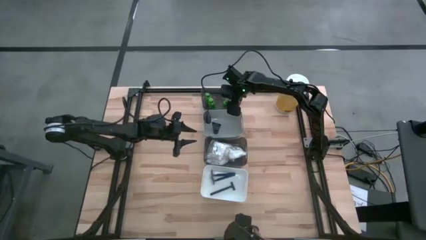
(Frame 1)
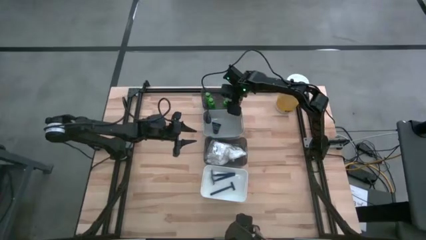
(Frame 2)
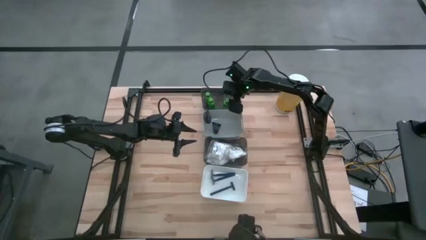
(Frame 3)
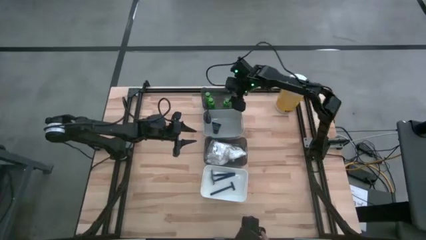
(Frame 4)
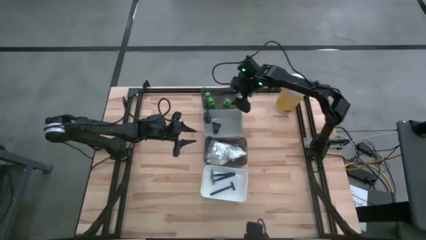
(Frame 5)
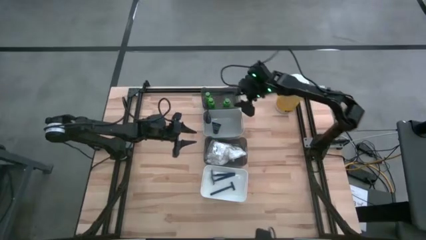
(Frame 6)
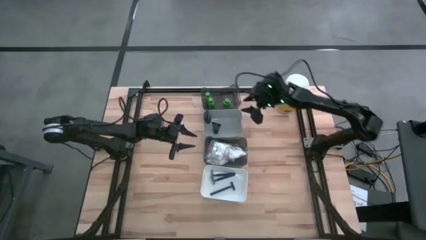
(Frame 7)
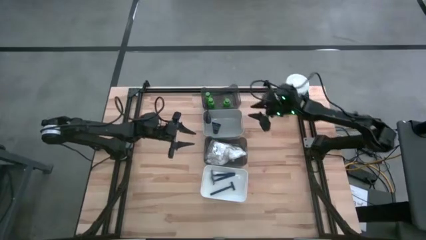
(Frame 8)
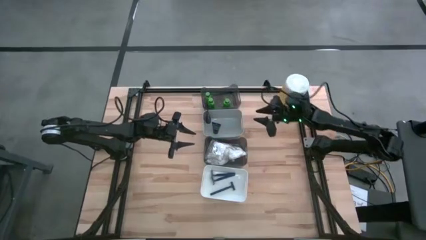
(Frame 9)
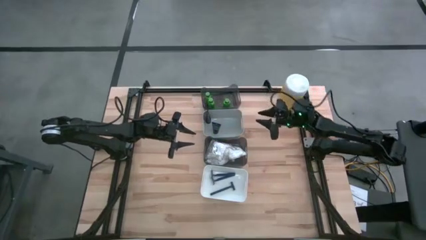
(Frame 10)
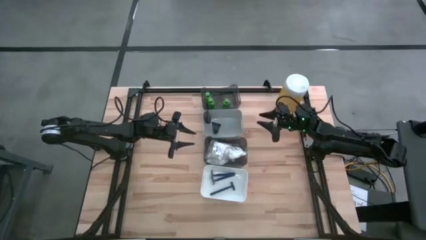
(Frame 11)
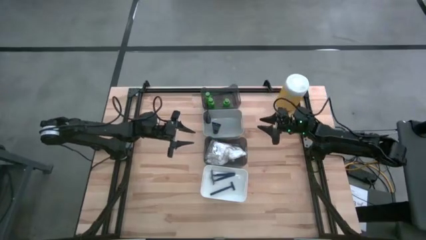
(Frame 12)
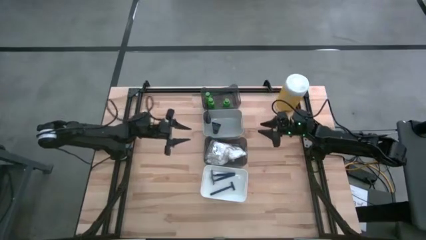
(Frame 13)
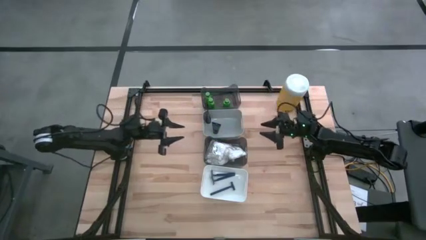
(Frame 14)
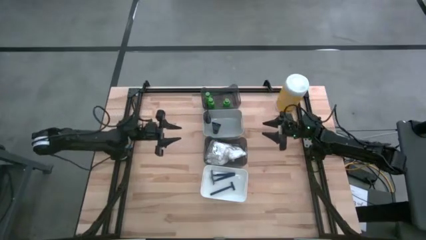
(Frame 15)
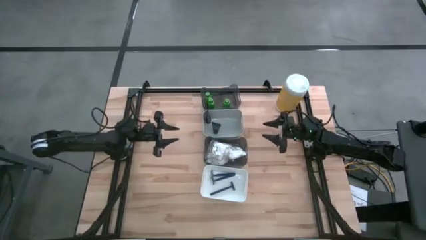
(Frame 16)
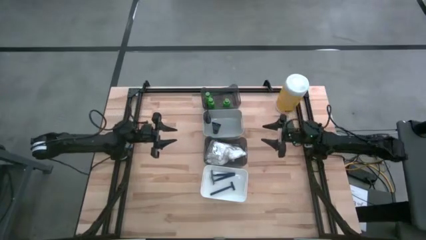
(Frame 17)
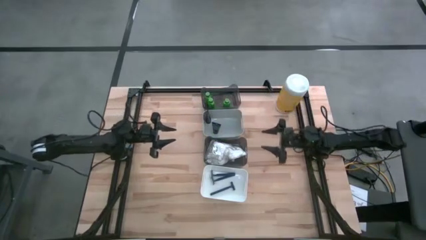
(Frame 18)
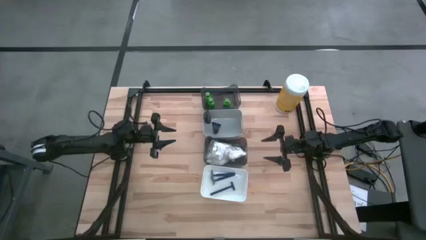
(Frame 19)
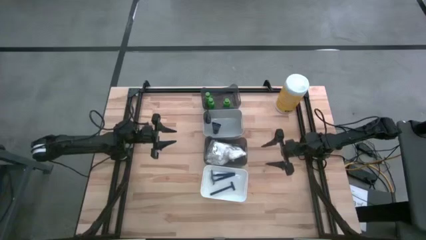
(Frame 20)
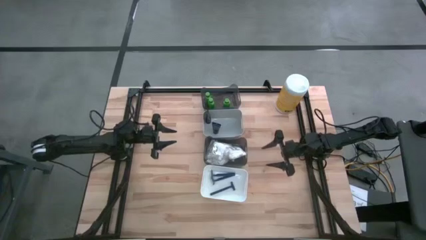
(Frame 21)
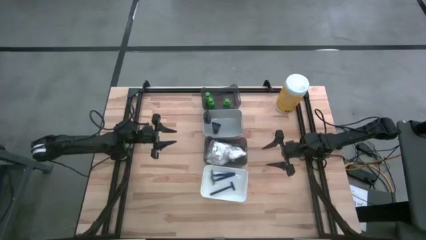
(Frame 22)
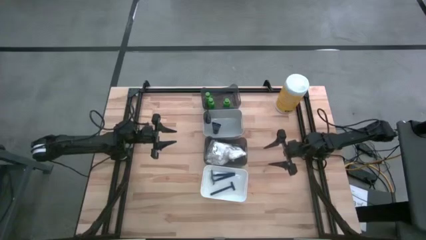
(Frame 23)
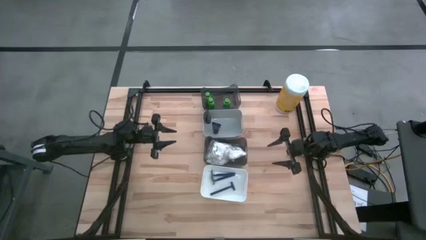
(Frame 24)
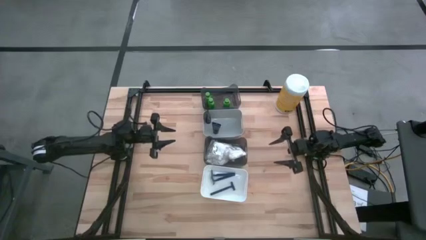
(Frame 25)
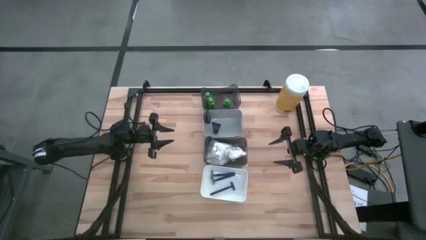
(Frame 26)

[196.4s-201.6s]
Task: Pick & Place Travel size toiletries
Return to Home Position

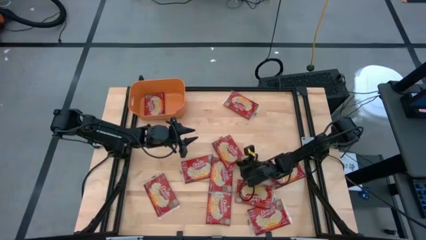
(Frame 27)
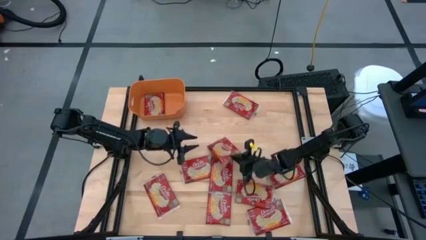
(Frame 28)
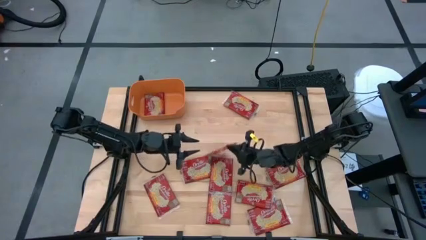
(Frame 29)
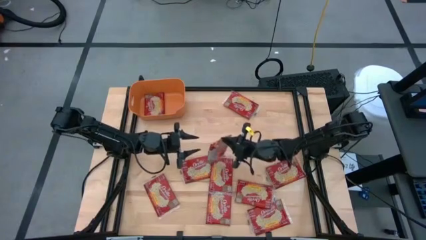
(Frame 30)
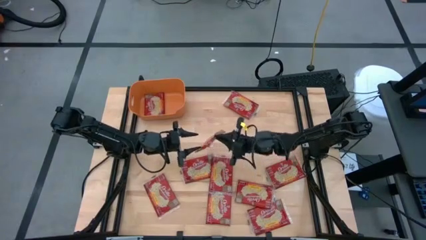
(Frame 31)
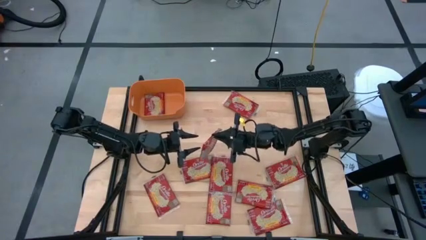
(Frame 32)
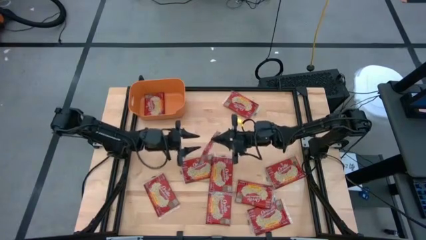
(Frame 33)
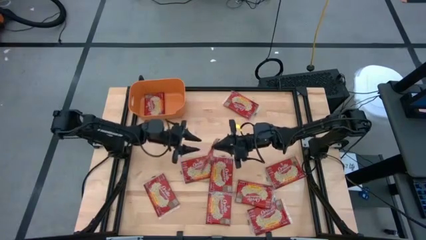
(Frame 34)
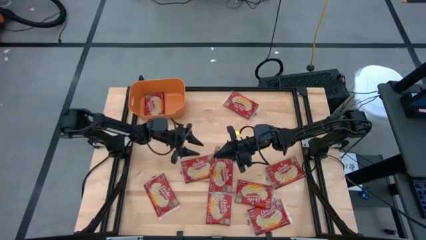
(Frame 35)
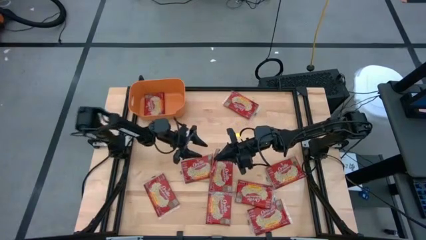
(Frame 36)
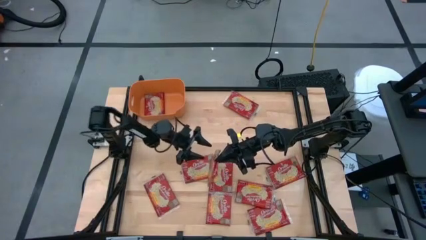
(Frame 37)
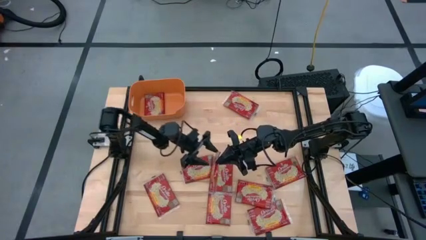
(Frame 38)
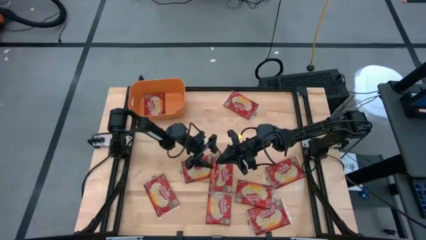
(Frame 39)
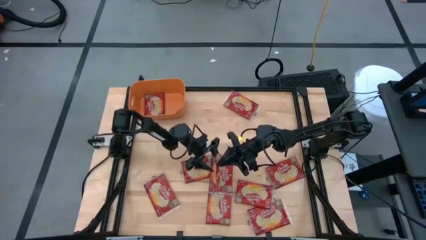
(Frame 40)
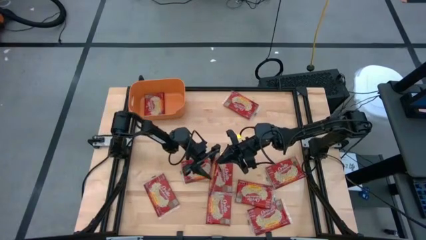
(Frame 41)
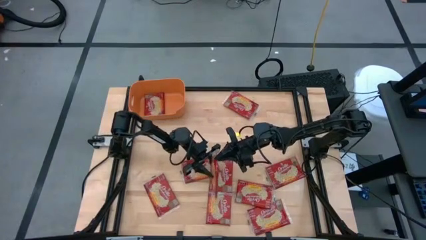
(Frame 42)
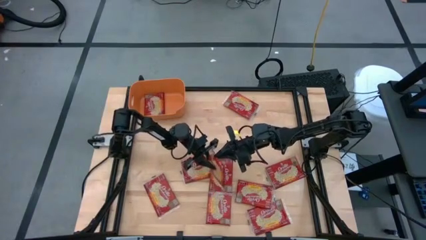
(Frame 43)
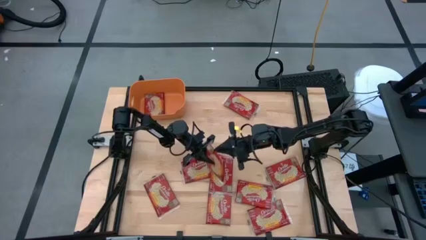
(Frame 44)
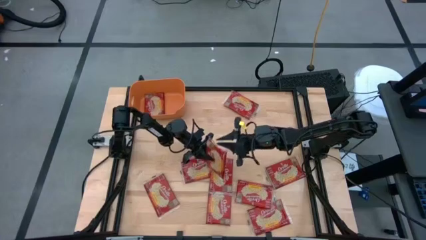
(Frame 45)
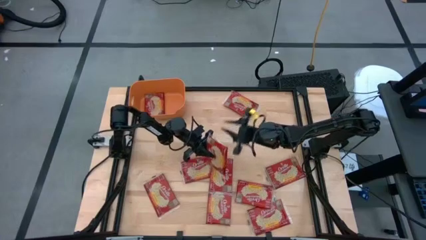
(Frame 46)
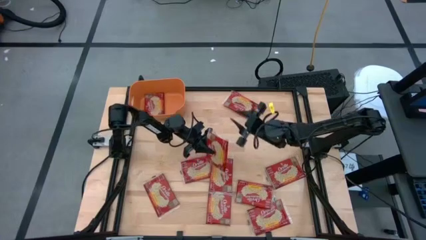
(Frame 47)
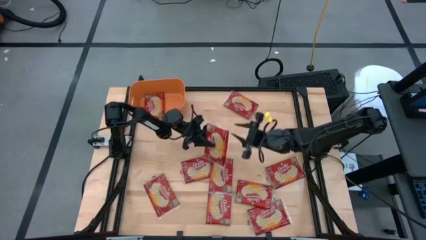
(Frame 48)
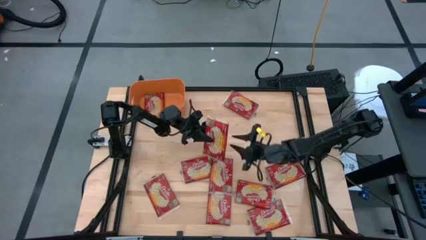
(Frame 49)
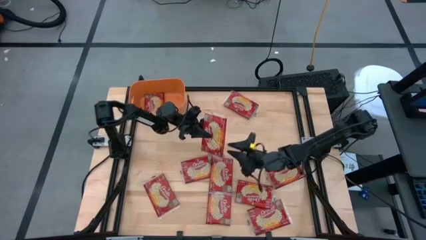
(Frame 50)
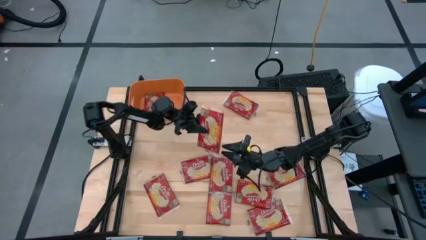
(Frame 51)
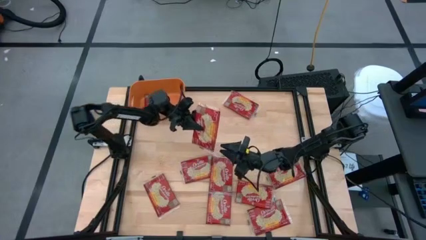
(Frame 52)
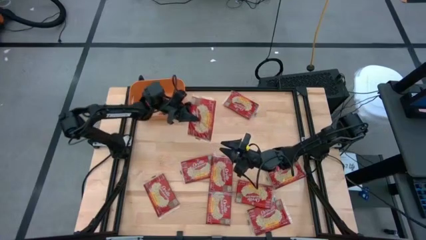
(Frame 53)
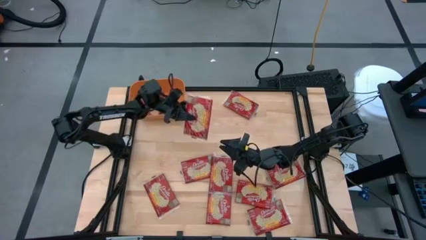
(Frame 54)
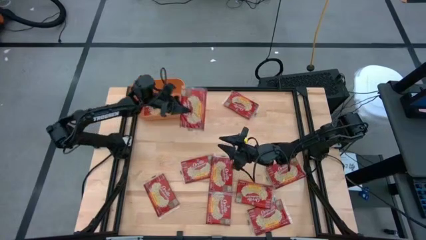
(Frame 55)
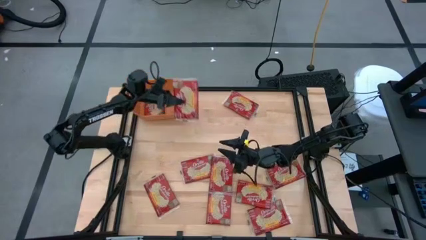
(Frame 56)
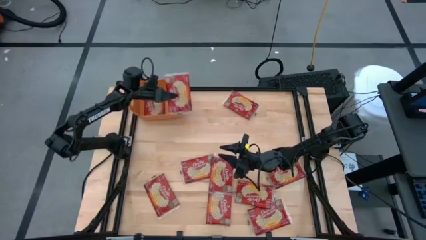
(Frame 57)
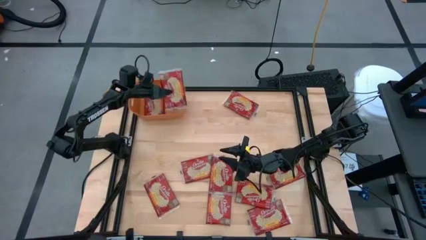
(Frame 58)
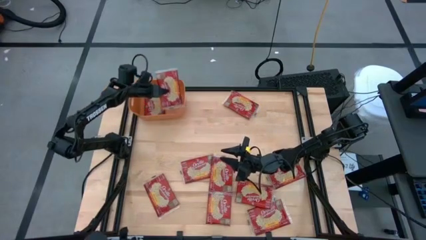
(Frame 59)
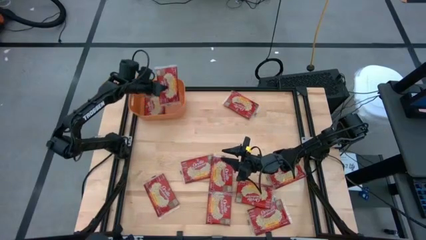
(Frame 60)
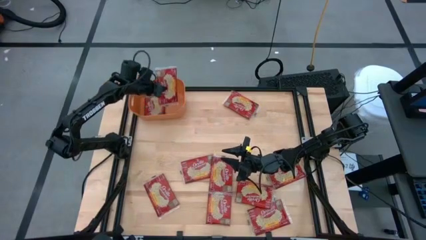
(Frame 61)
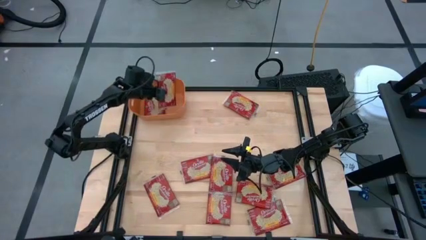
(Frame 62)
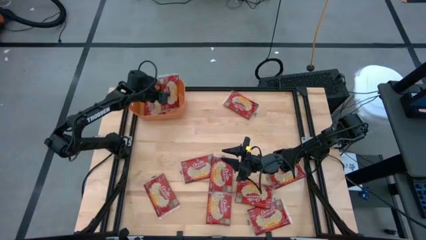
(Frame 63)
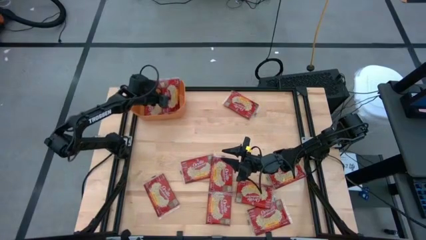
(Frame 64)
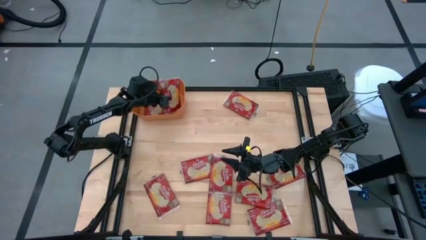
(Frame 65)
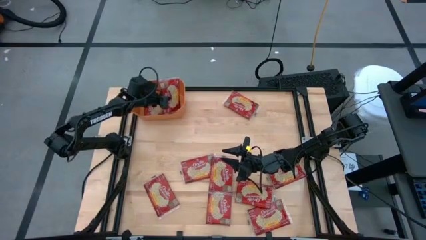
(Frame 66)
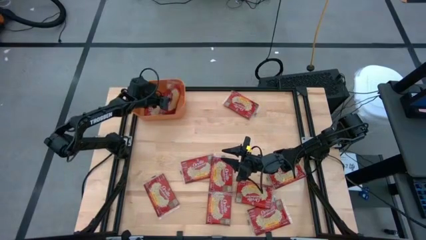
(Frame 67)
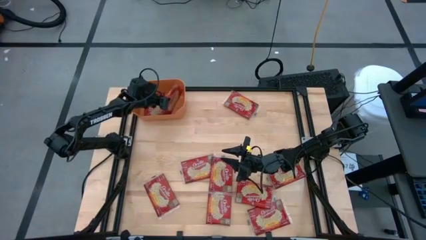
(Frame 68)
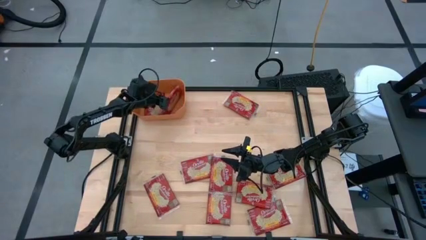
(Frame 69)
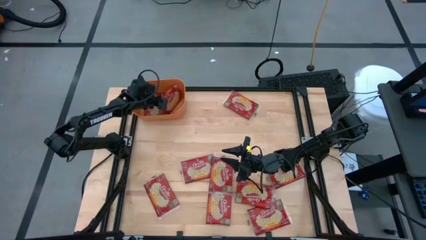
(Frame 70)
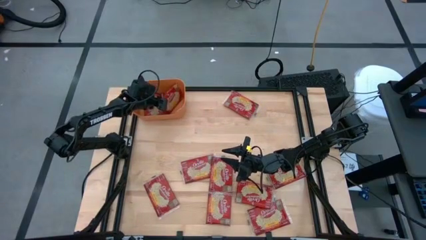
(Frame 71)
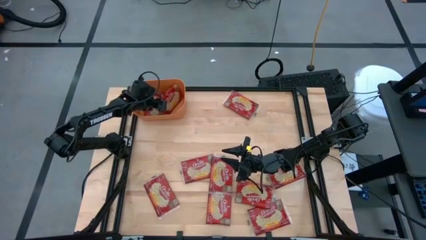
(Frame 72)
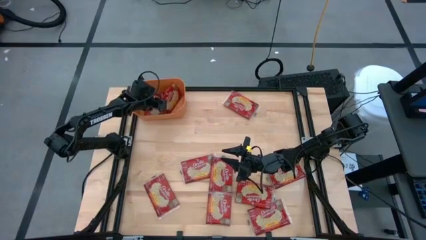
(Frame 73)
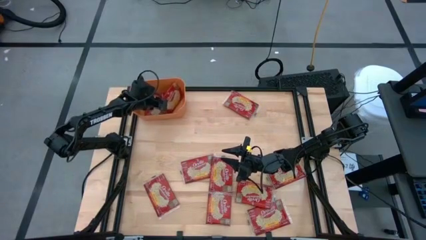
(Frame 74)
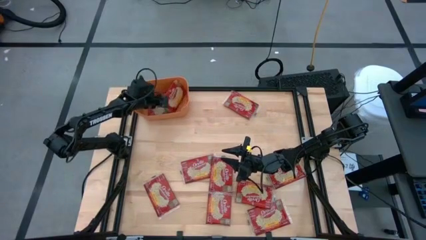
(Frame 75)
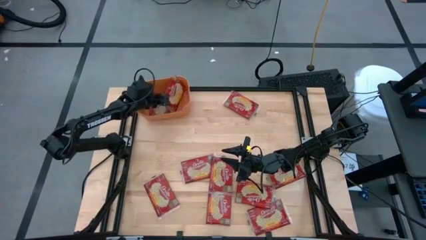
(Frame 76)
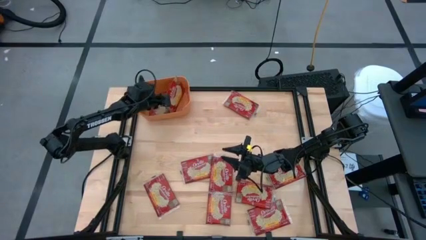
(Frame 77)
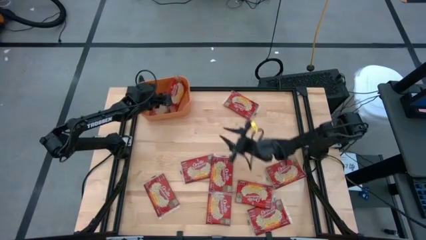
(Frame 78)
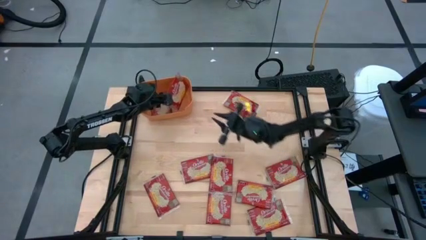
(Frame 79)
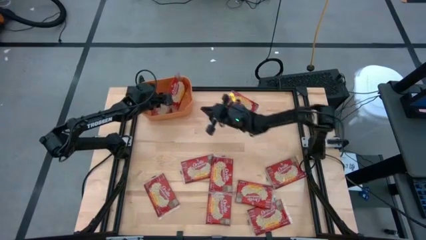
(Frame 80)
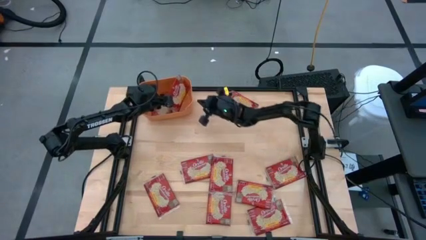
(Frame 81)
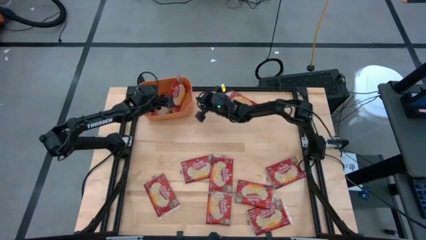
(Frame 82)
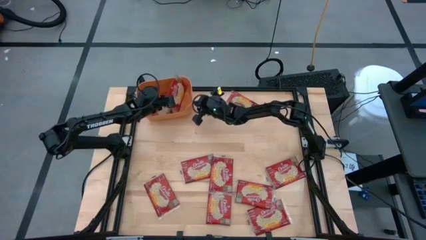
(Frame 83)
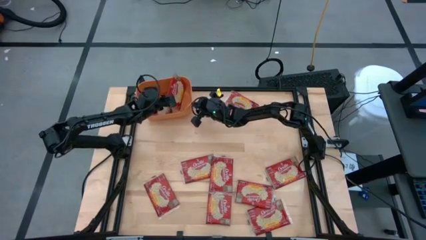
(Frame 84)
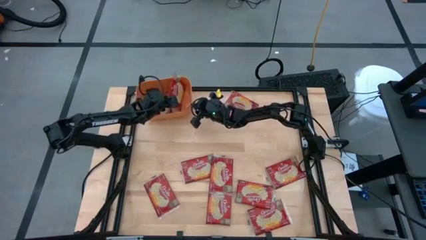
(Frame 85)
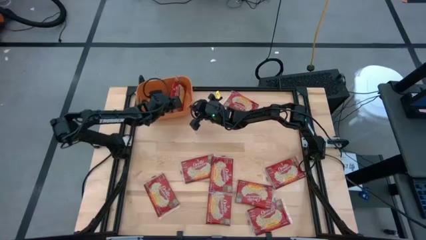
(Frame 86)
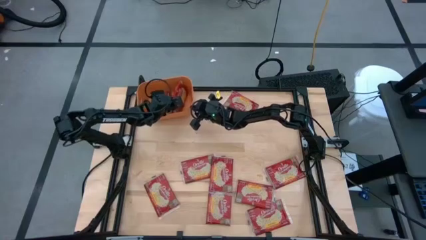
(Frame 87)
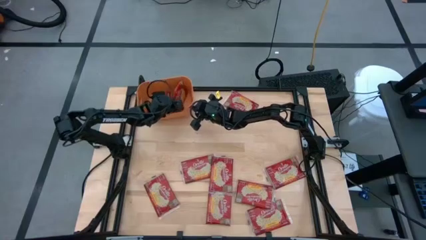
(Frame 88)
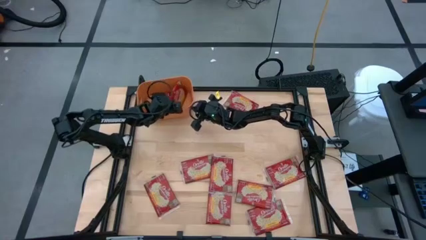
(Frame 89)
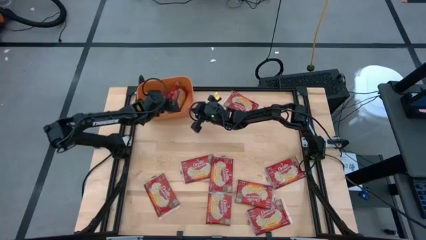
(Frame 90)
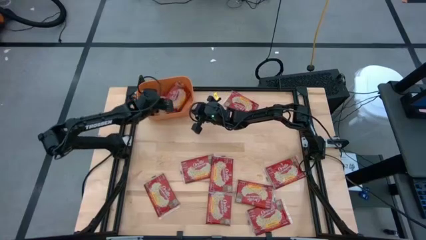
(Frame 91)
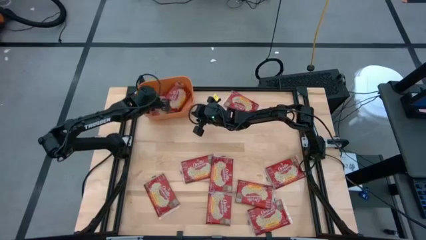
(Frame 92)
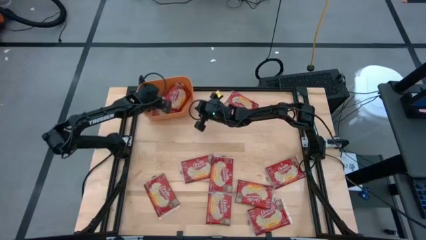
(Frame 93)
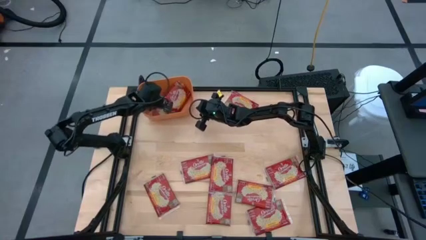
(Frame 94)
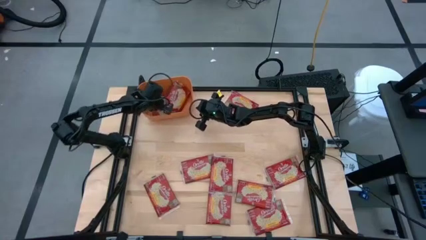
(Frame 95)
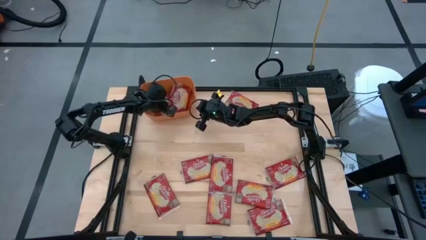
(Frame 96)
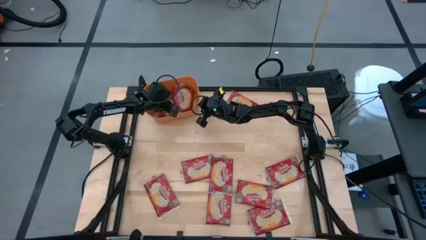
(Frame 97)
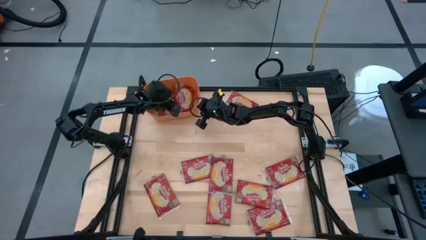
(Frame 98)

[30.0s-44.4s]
Task: Sort popcorn bags into baskets
Put the red popcorn bag into the orange bin
